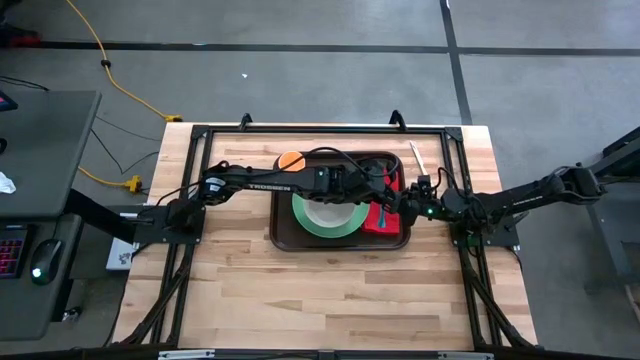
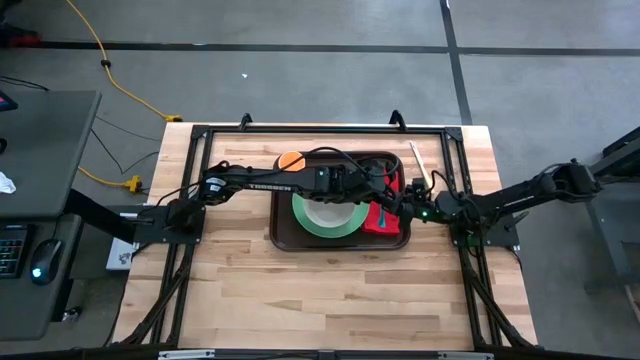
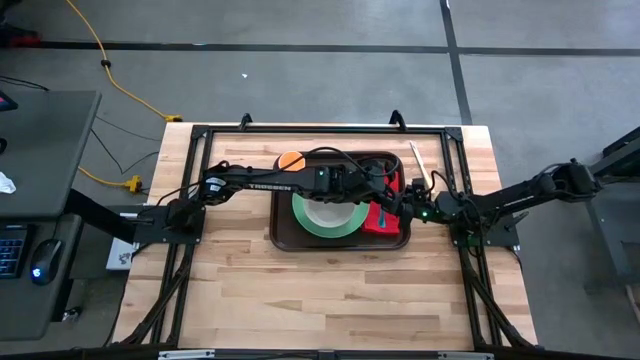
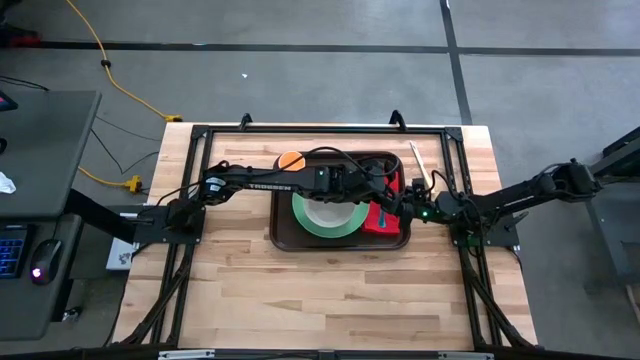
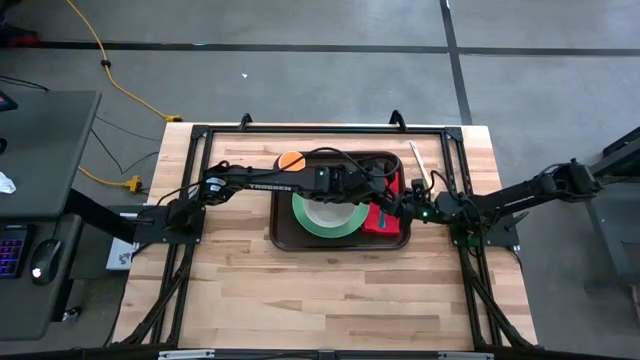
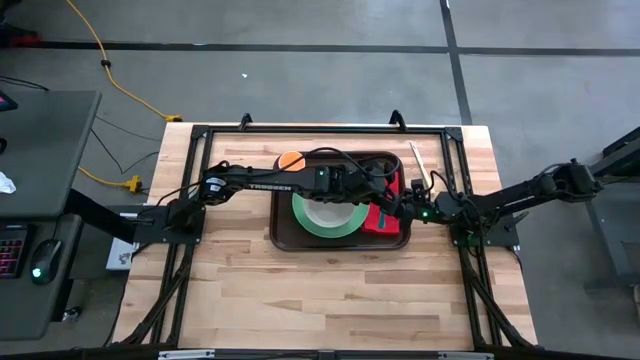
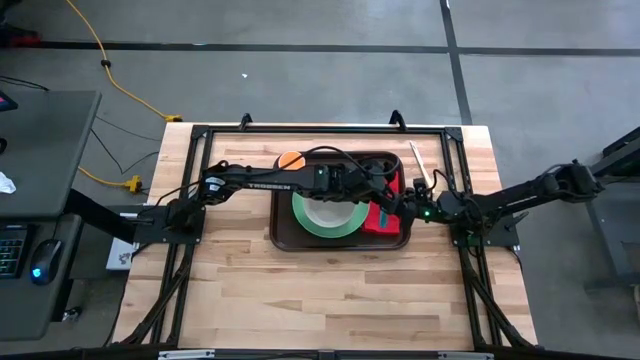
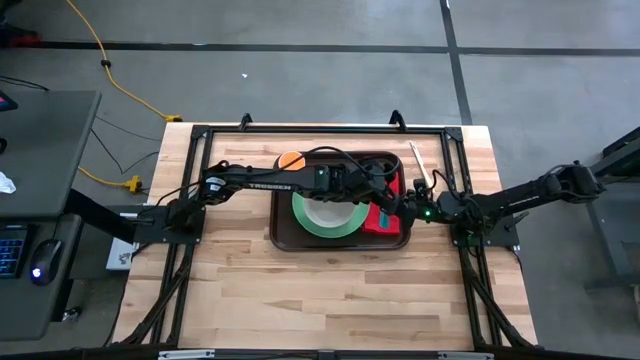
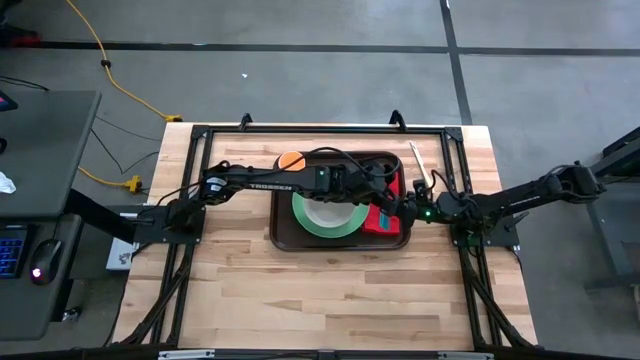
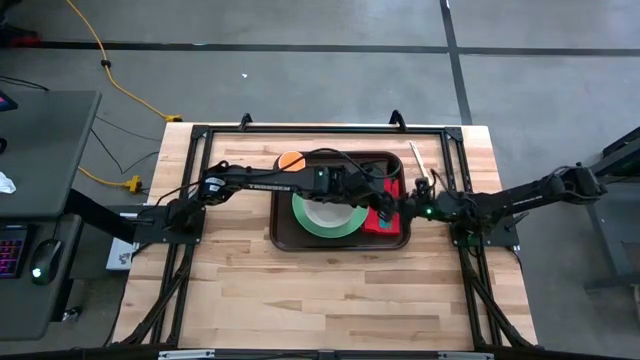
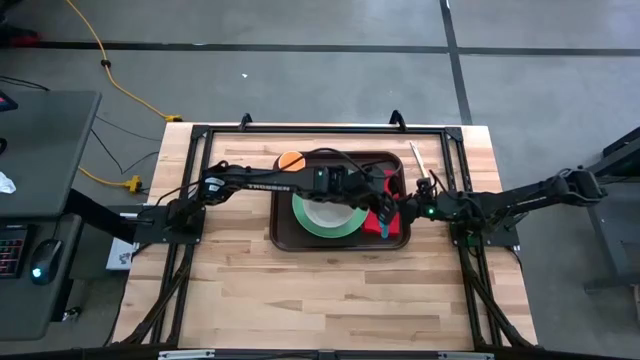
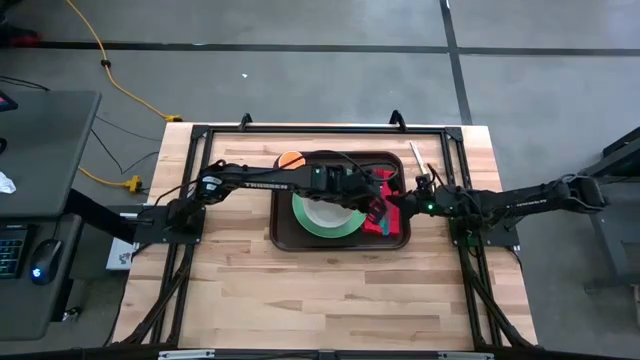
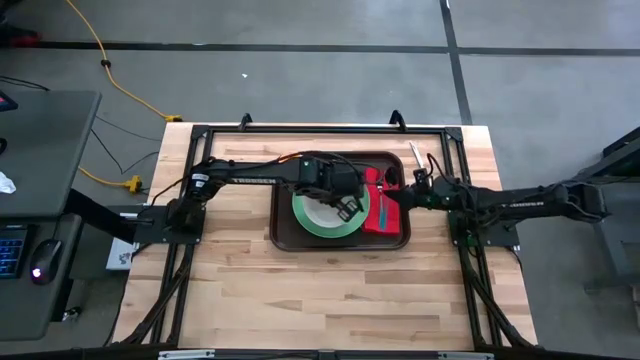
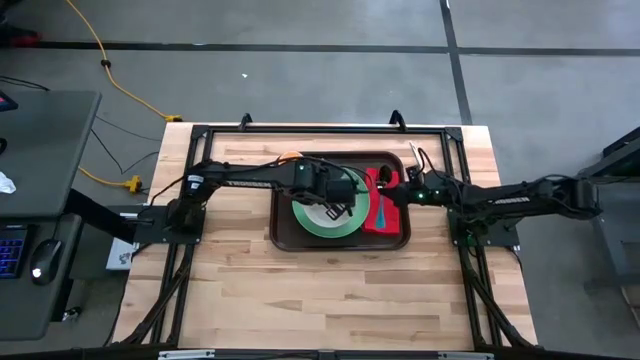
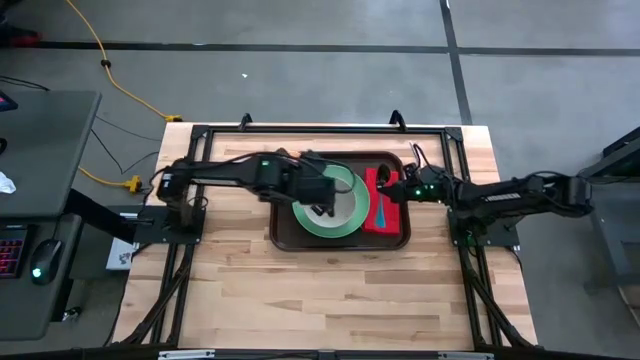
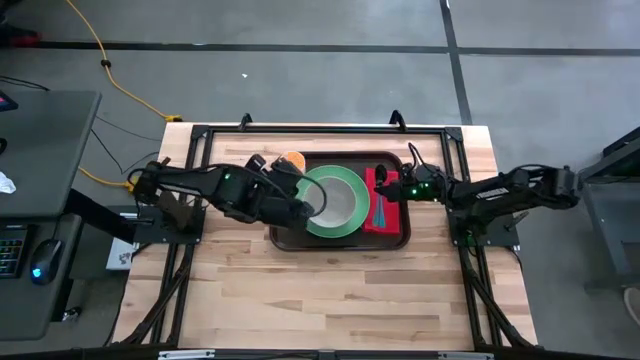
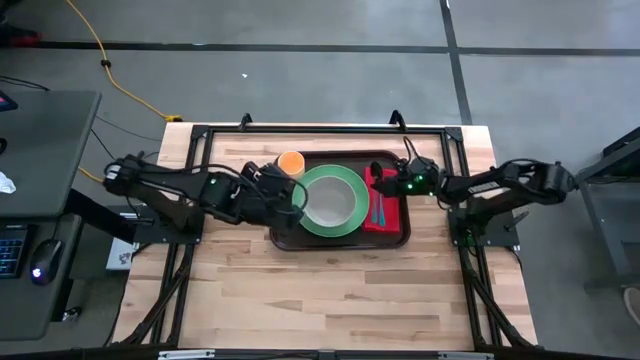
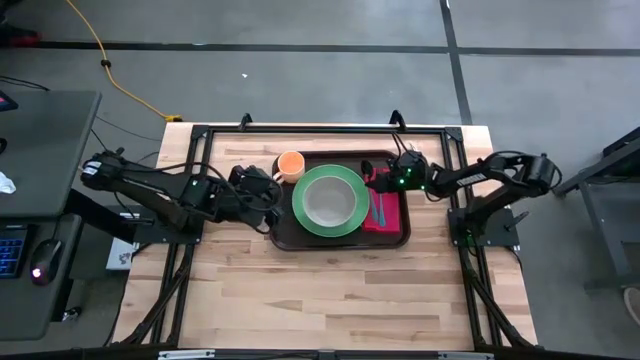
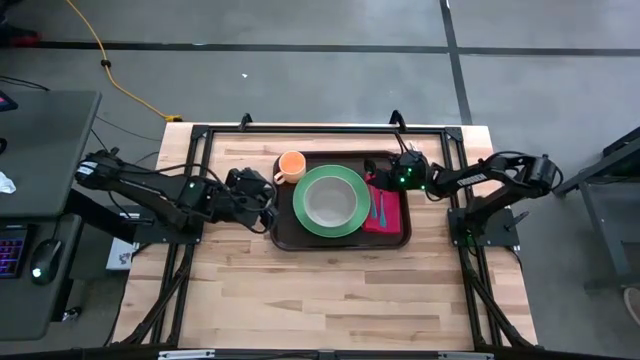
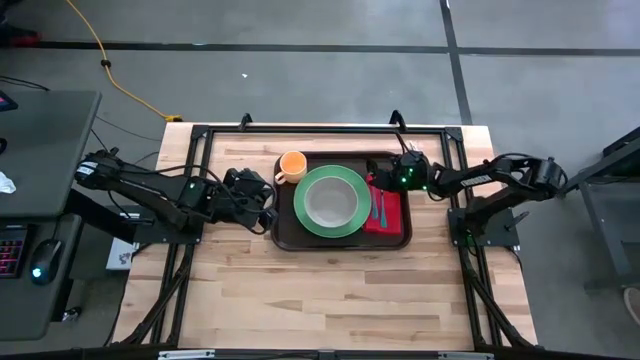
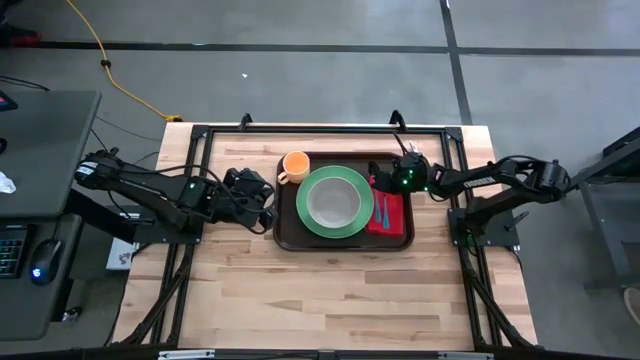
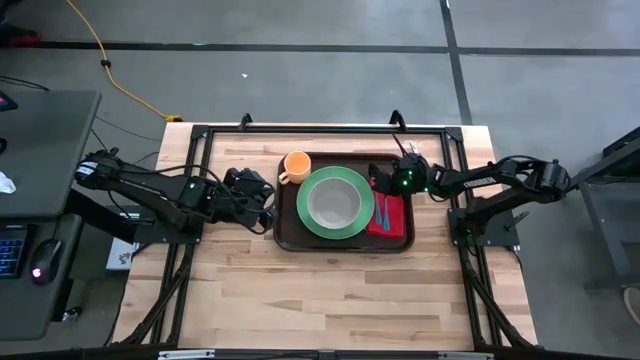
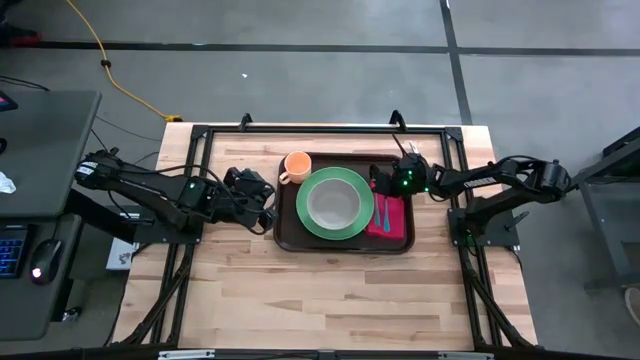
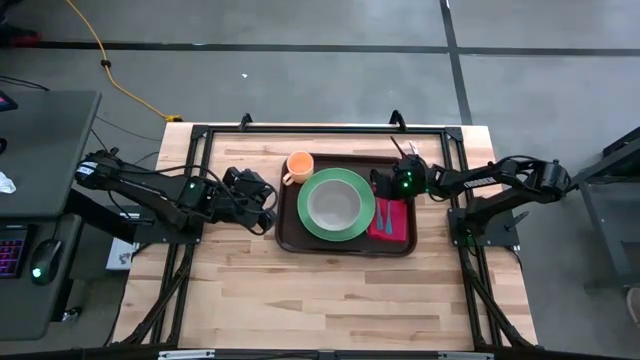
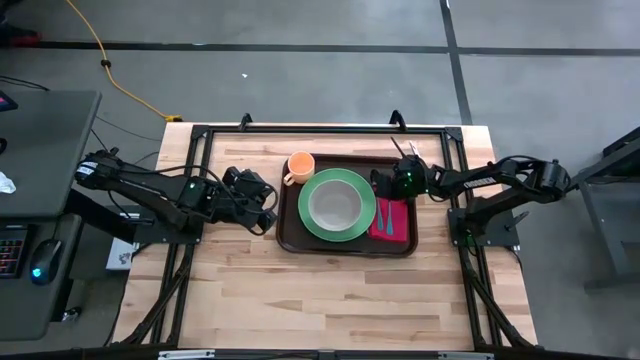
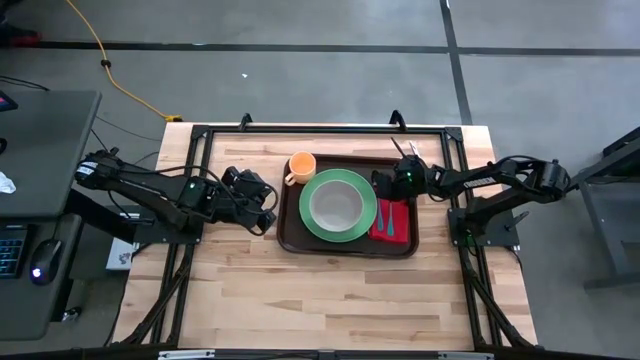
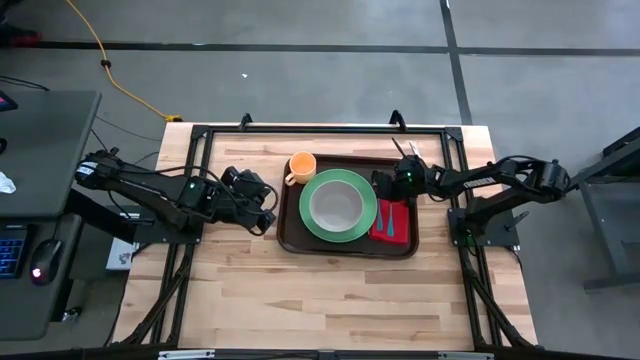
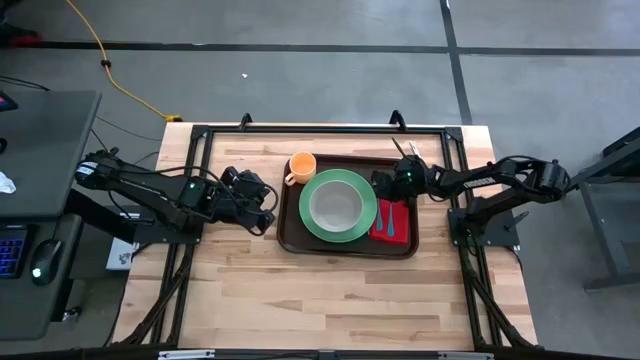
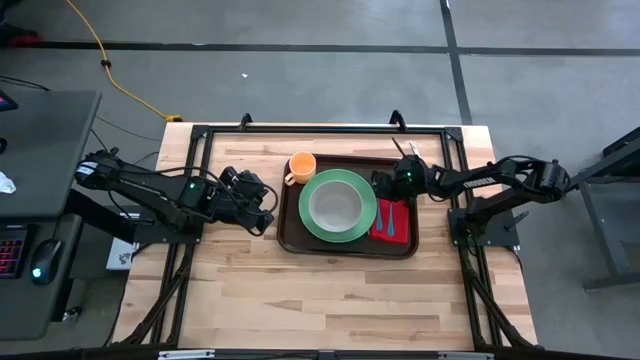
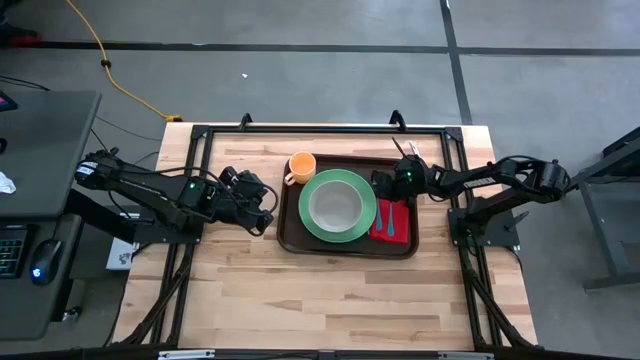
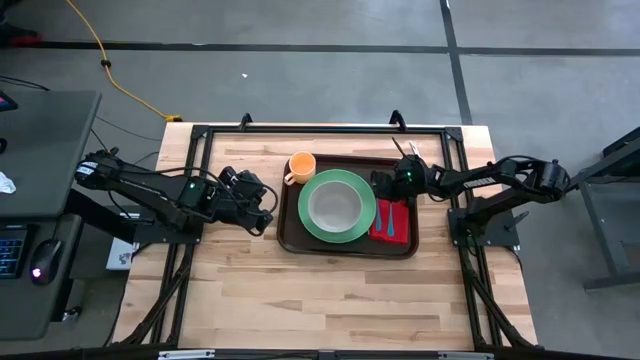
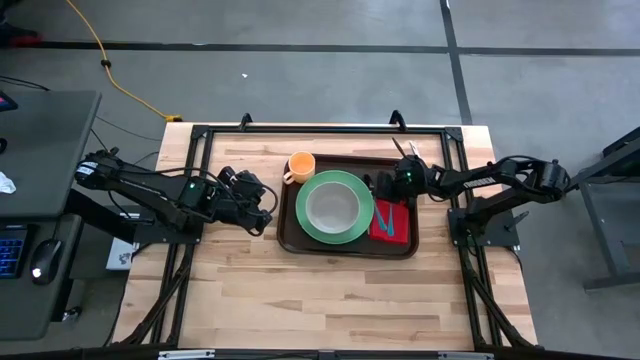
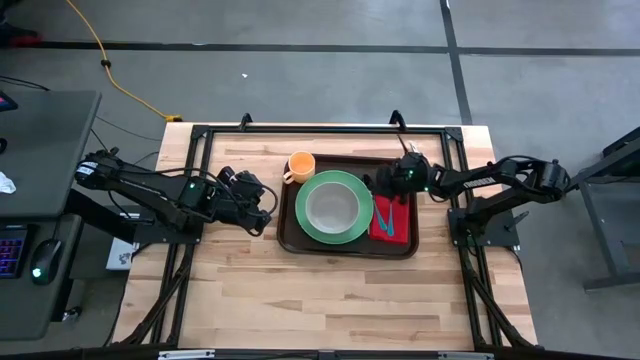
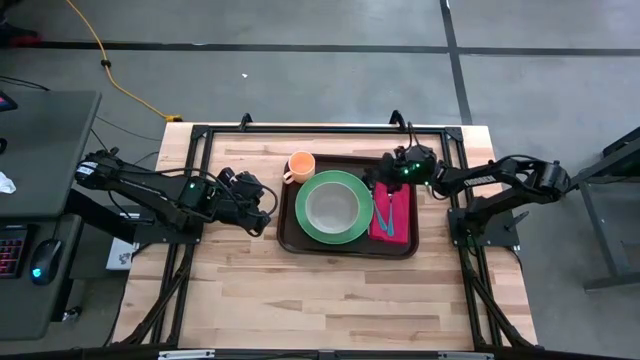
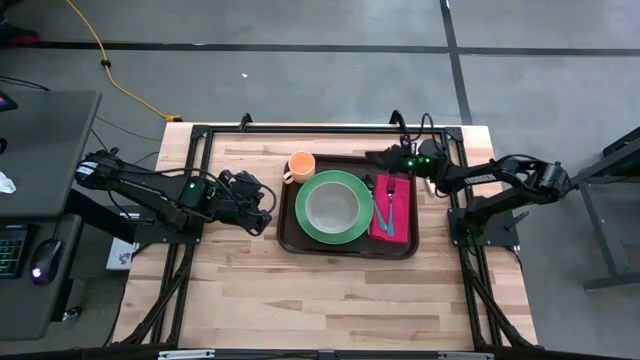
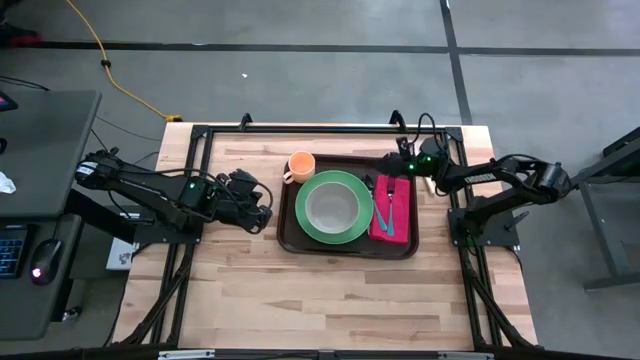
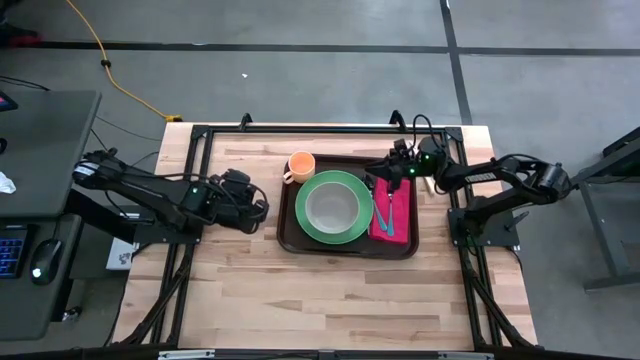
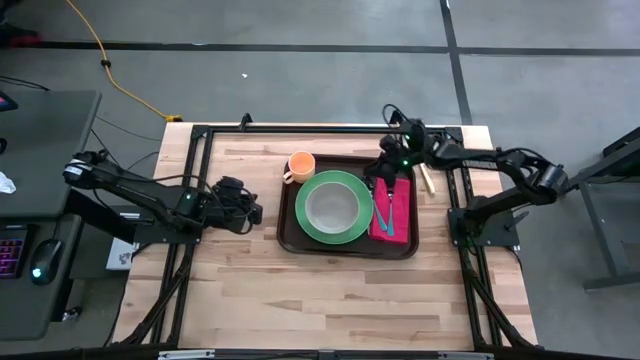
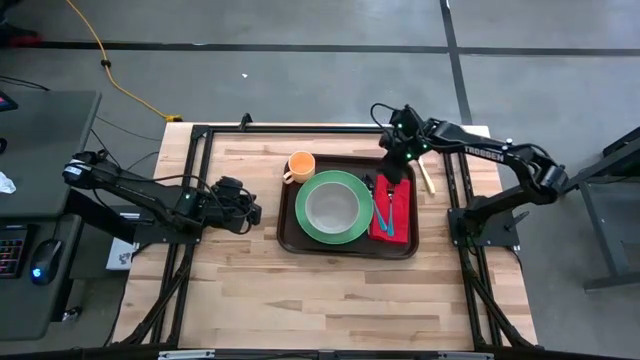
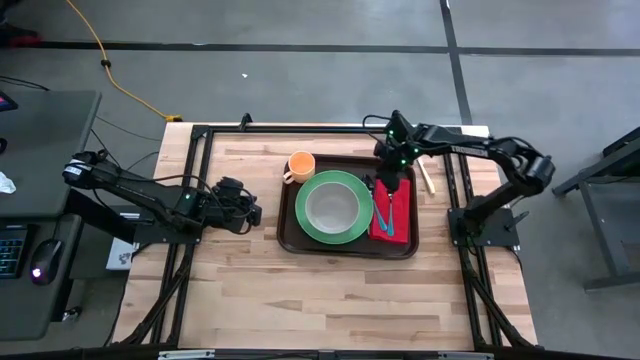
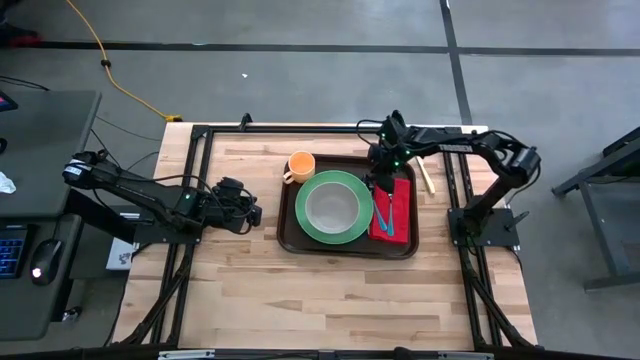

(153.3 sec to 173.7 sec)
Task: Set up tray
Put the blue spoon on the red napkin to the left of the blue fork
